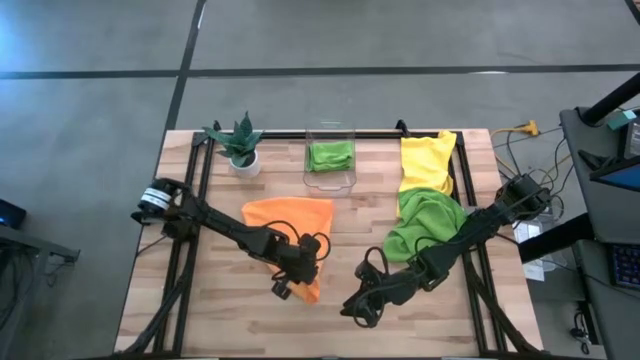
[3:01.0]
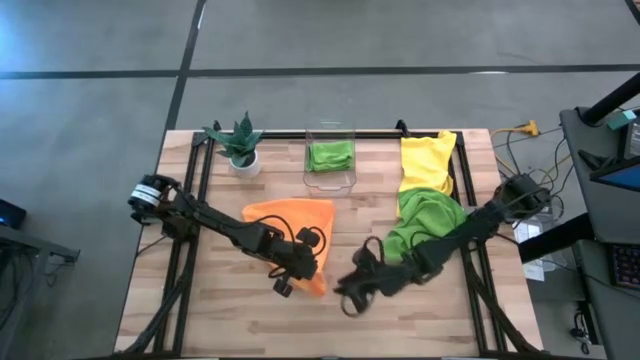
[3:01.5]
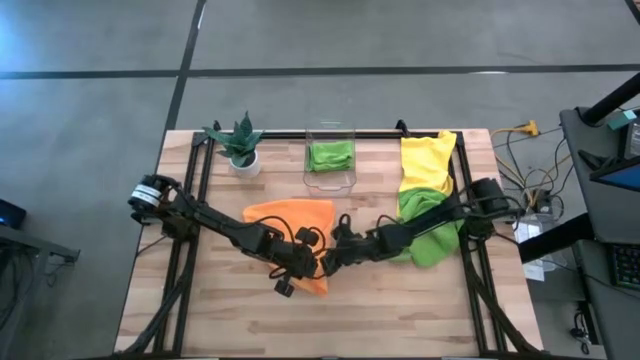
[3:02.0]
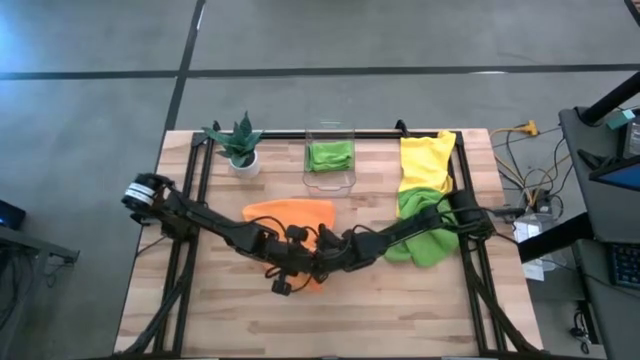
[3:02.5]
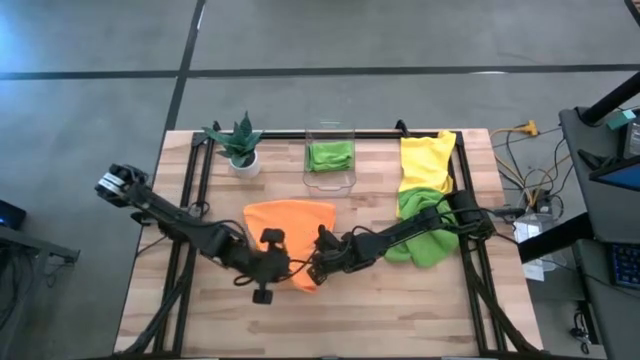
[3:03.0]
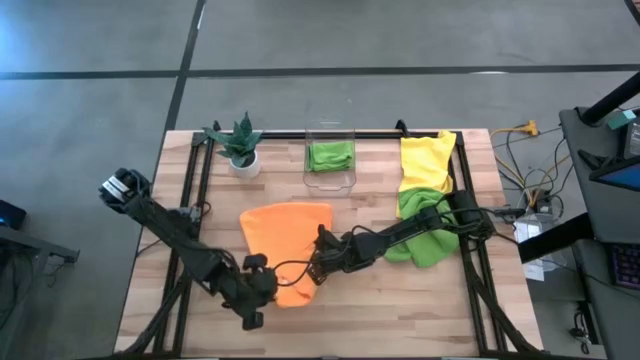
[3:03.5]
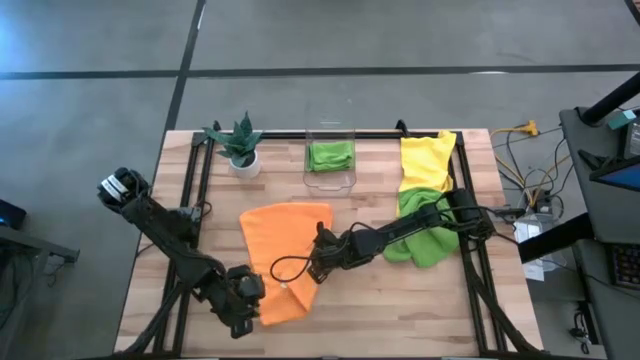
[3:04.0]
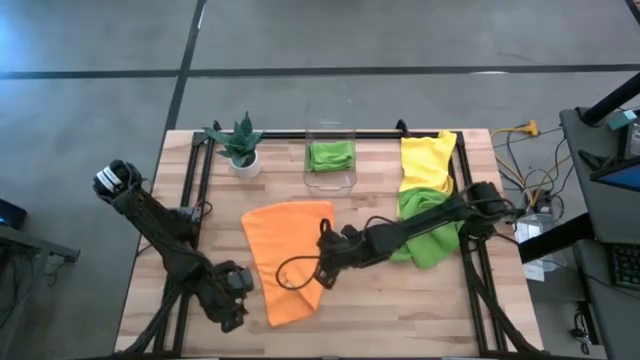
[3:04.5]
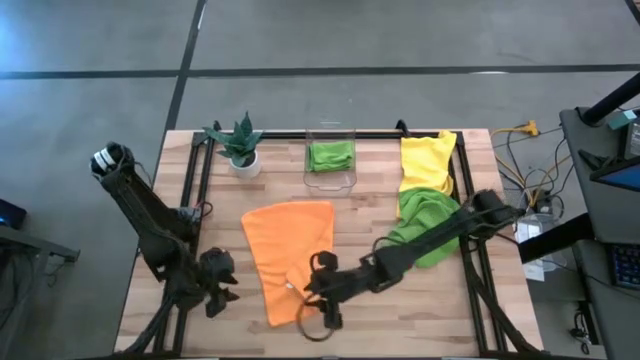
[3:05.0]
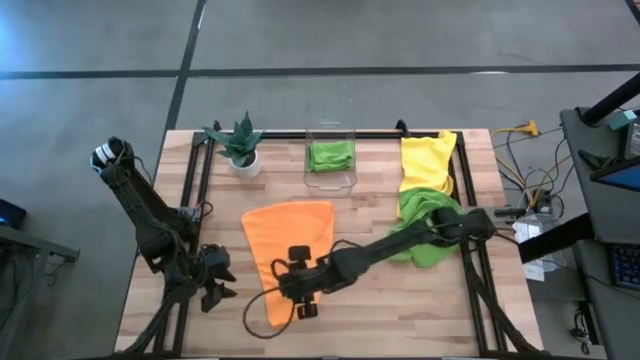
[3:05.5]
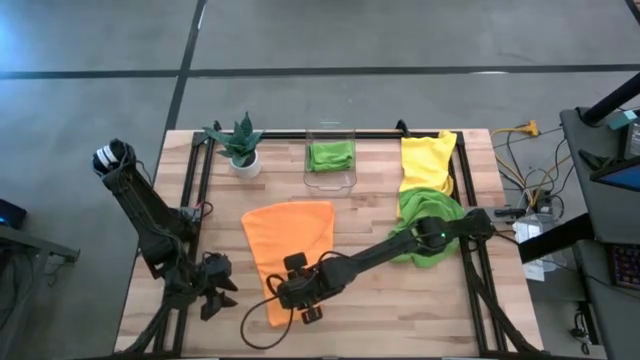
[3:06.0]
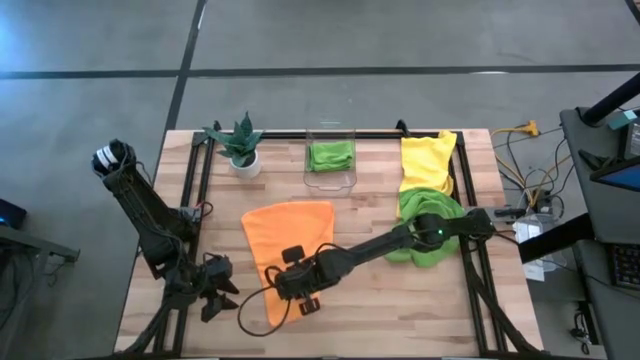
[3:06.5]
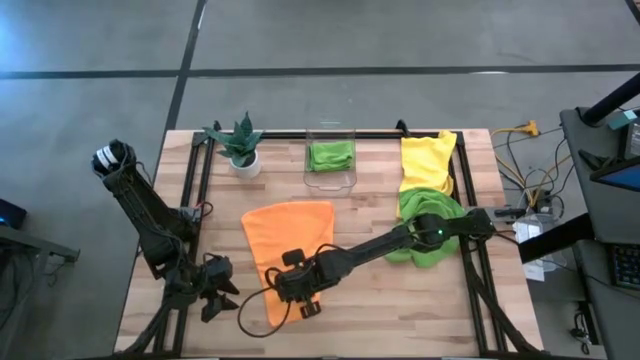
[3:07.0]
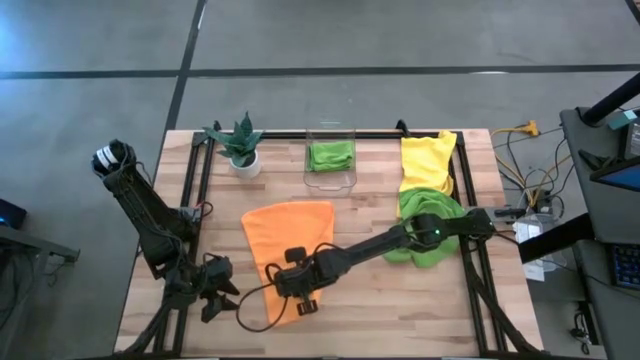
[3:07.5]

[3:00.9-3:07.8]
Task: Fold microfiber towels
Fold the orange towel

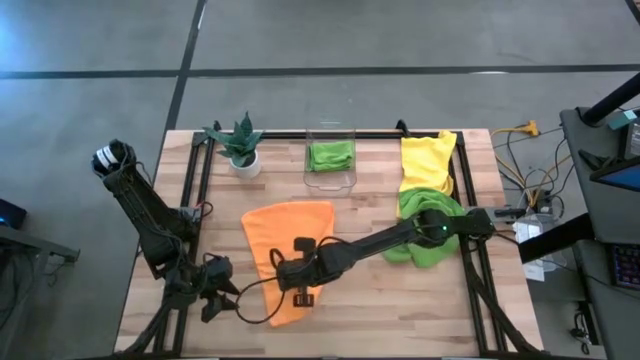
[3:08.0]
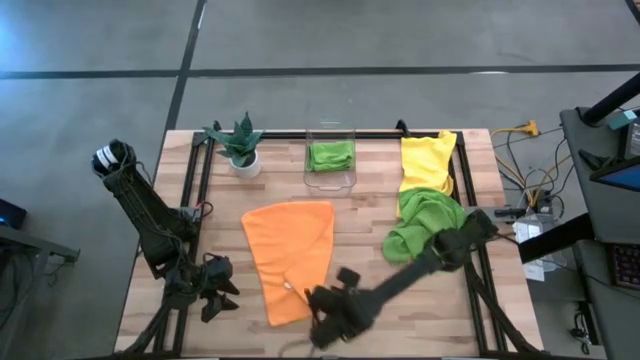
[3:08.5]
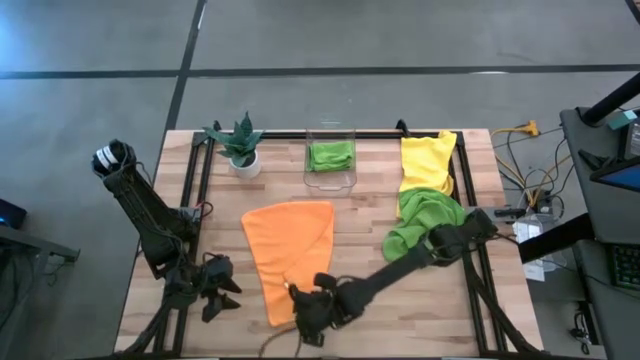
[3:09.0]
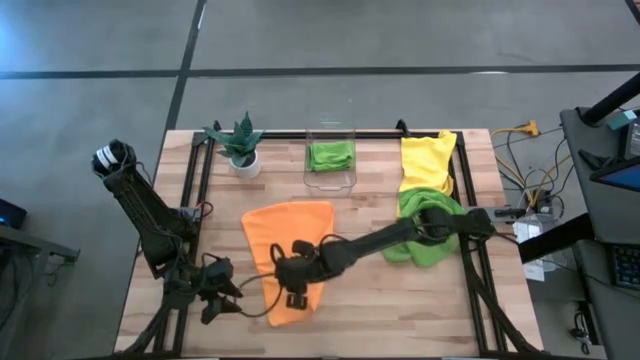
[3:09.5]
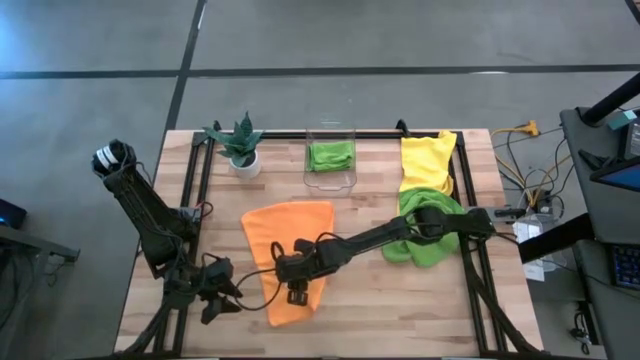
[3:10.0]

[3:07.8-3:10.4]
Fold the orange towel

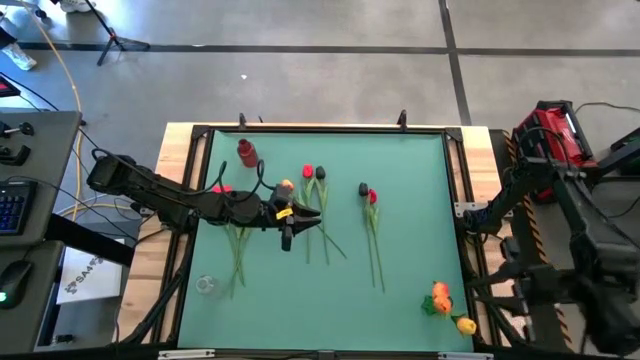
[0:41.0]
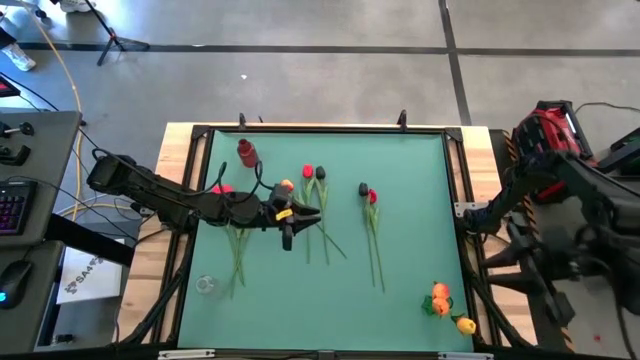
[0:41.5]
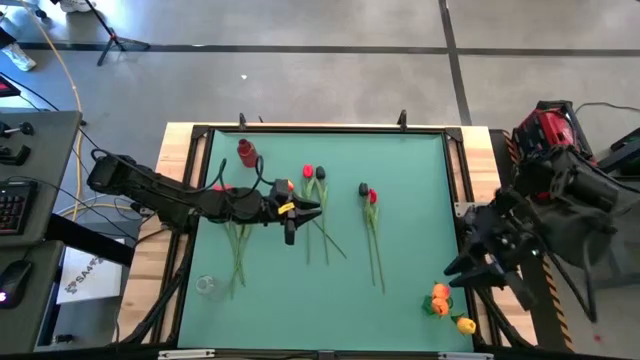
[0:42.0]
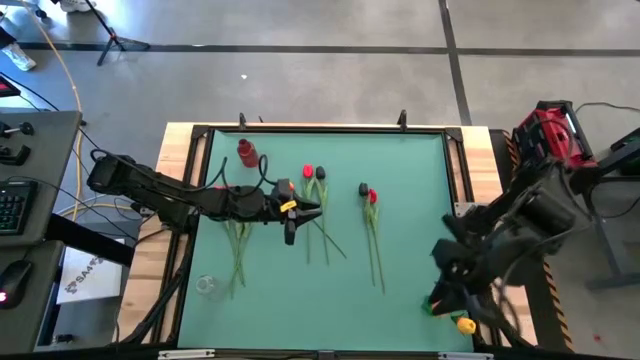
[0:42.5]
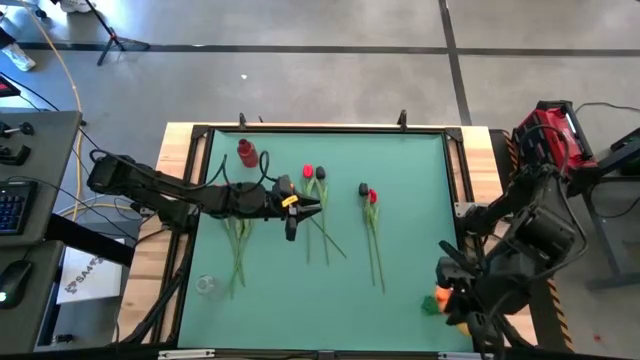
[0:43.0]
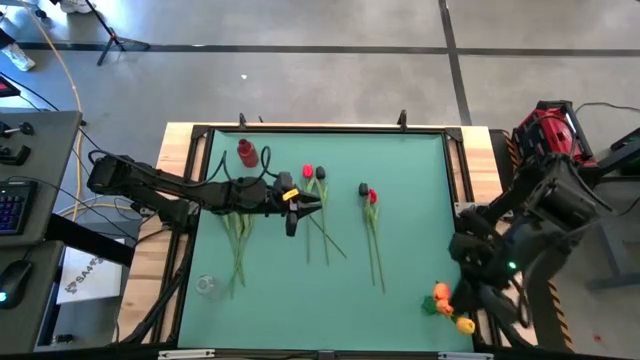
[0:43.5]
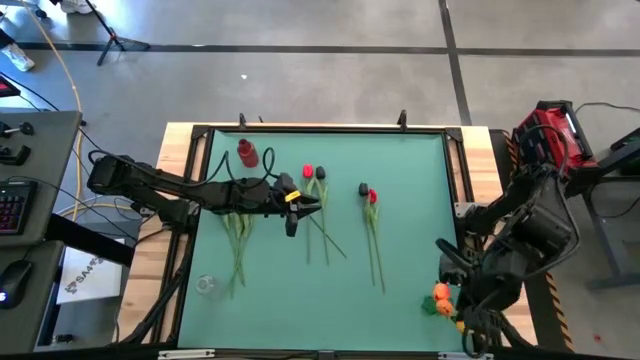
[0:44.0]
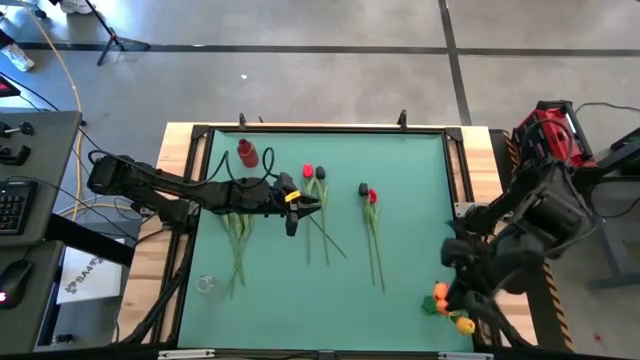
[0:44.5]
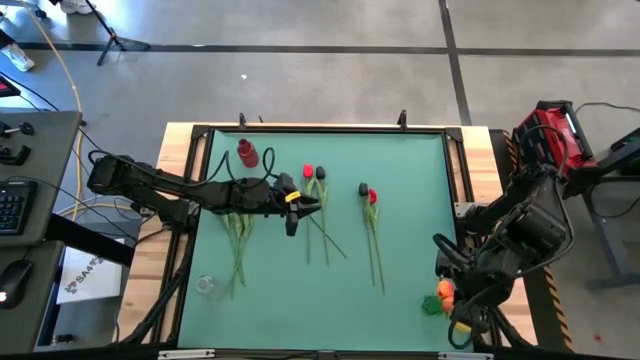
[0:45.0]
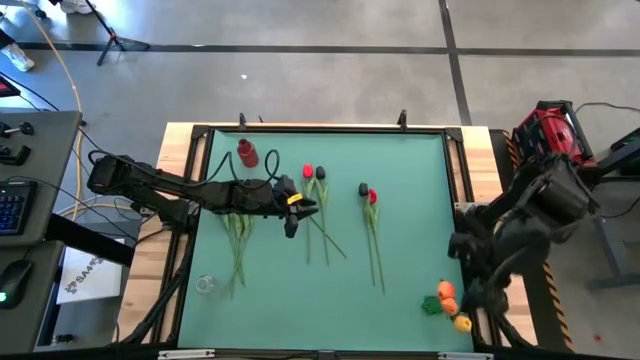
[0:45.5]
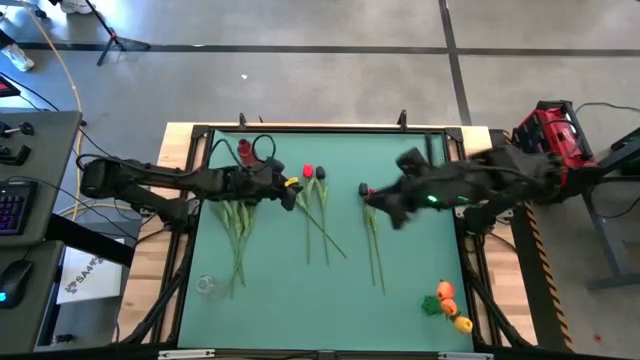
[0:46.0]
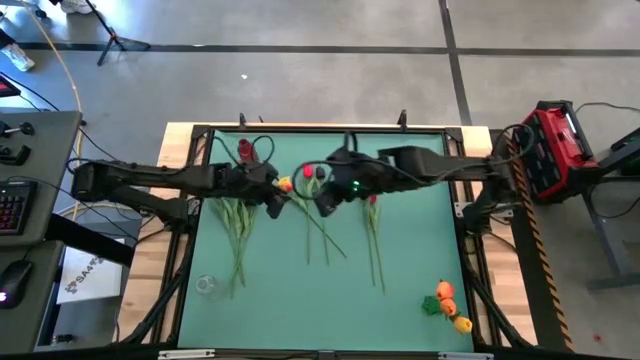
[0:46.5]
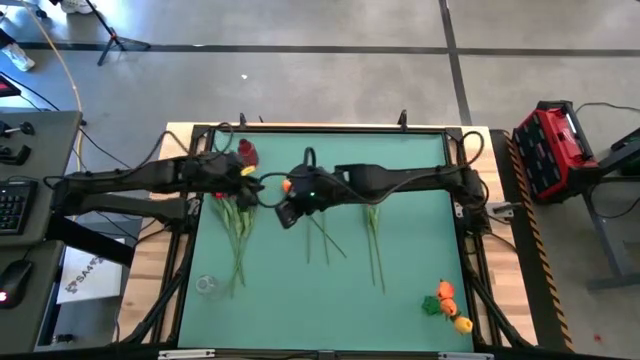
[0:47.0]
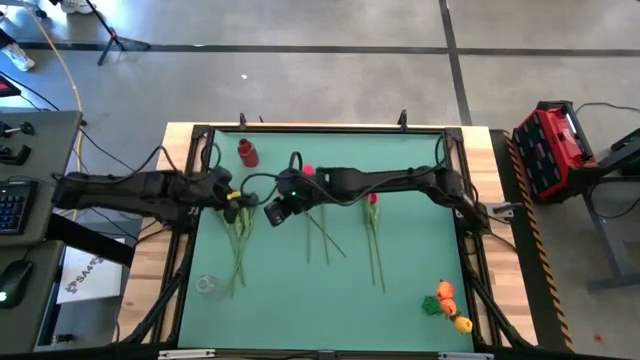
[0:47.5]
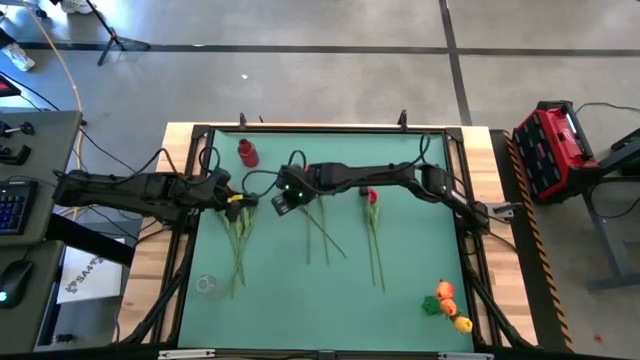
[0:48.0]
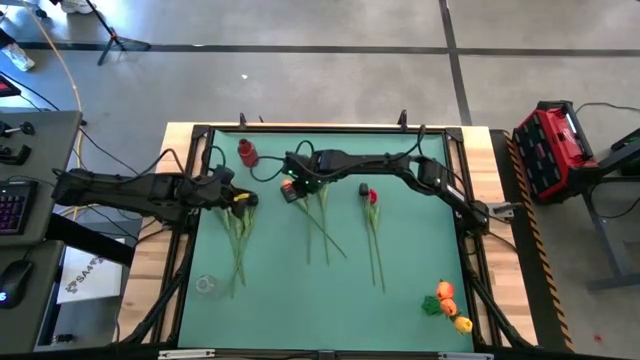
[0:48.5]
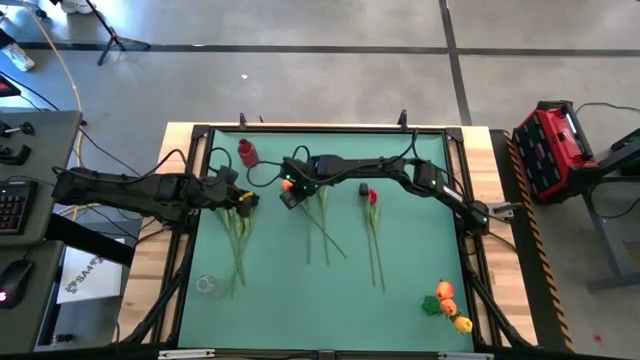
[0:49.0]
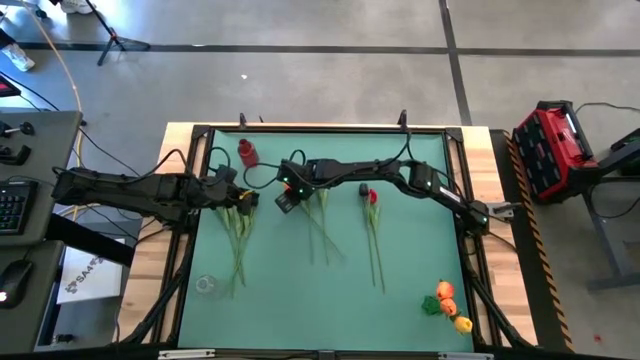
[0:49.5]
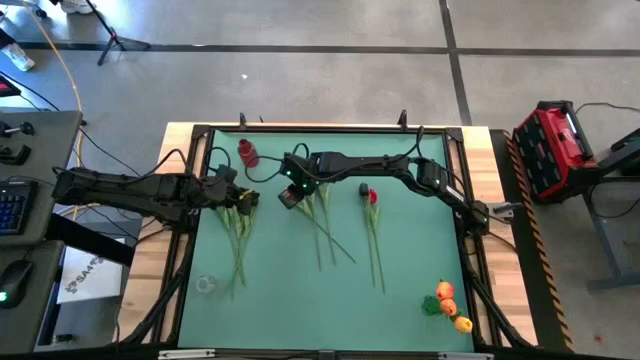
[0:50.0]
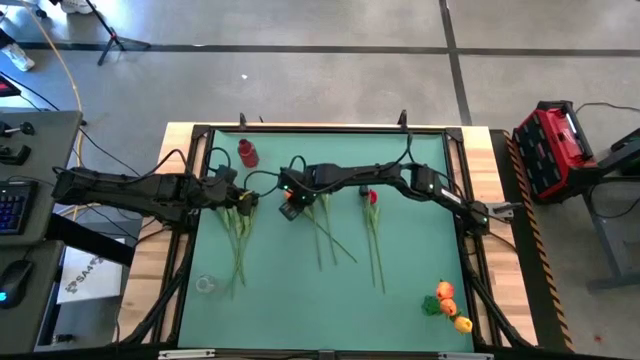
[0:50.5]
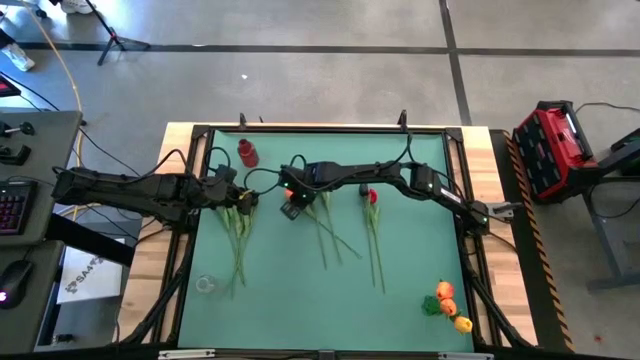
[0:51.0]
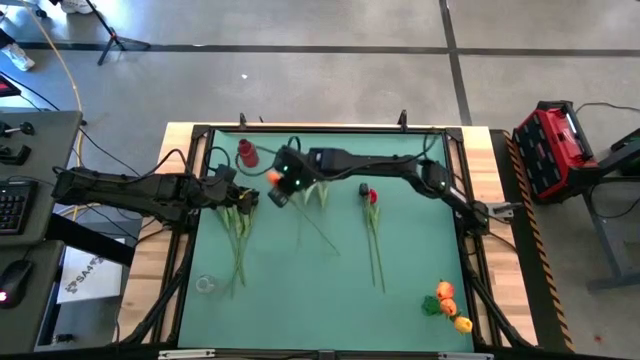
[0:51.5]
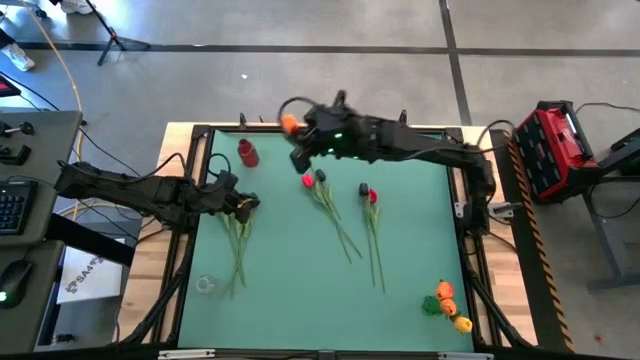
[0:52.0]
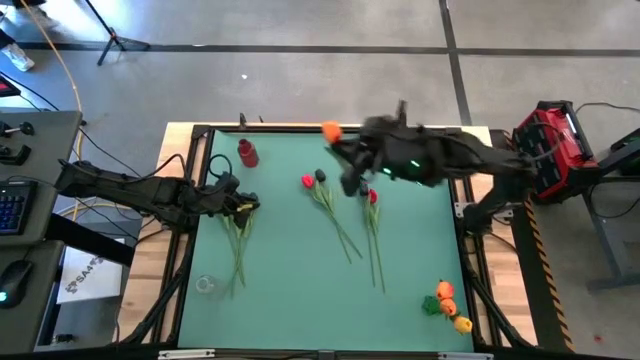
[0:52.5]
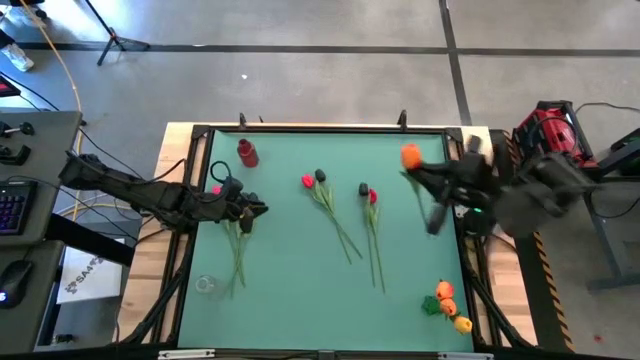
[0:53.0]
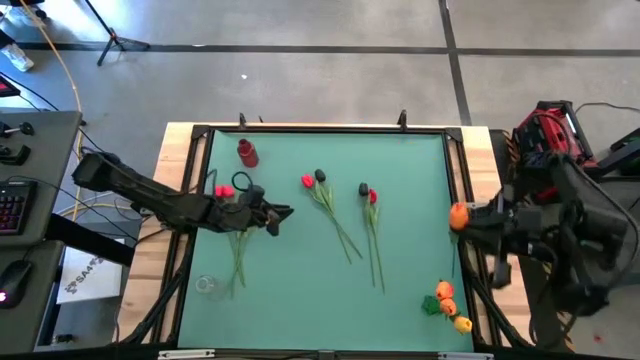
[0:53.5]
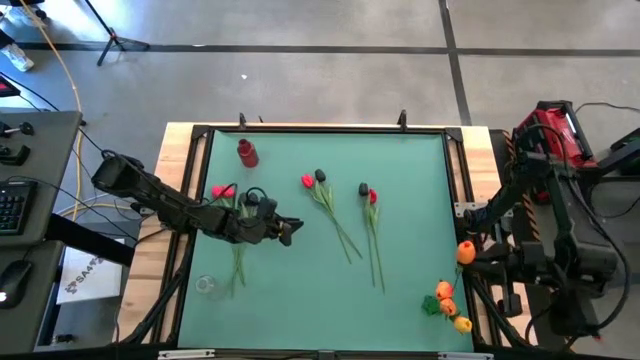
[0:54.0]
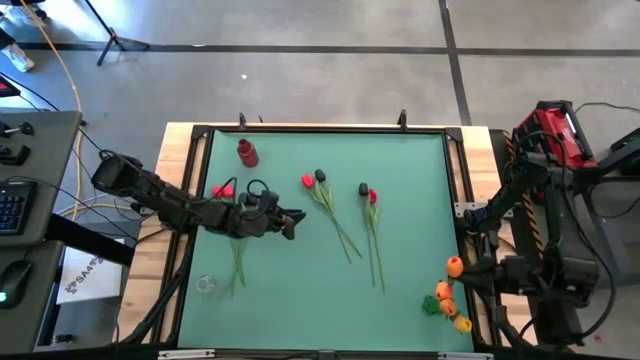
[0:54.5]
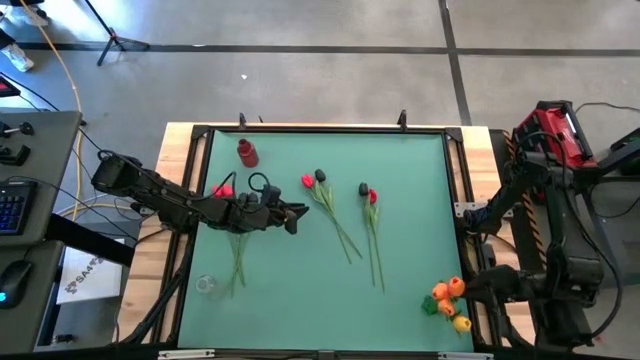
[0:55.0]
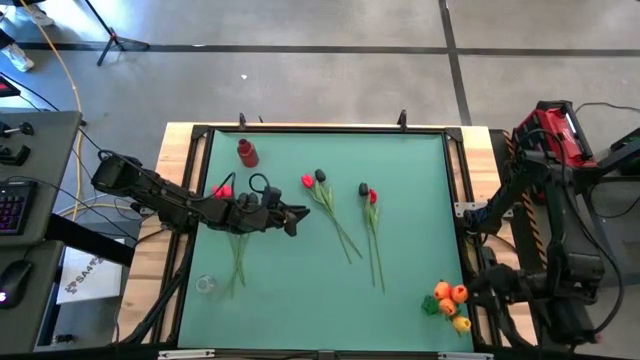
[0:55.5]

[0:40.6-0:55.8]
Task: Sort flowers into vase by color
Put the orange flower into the green vase
